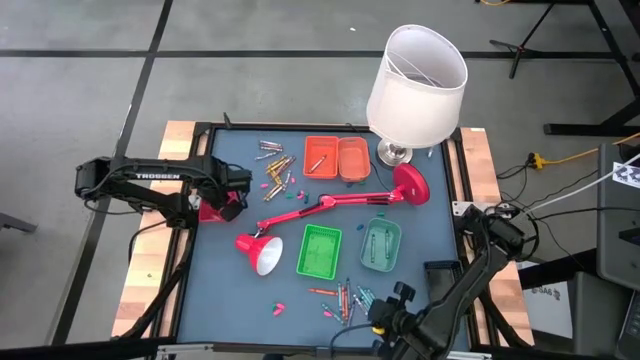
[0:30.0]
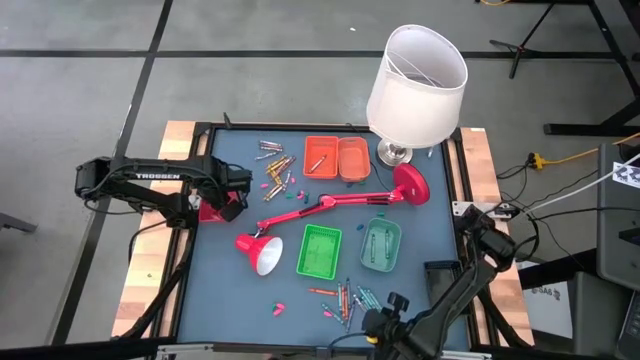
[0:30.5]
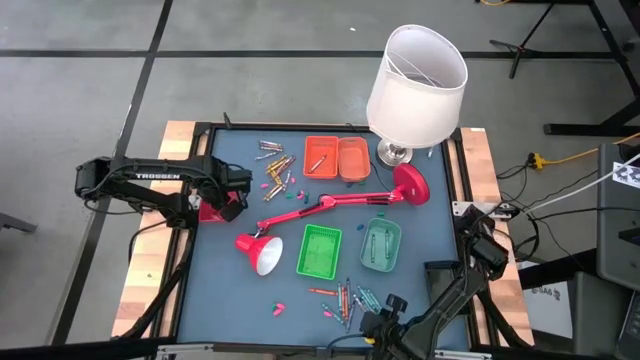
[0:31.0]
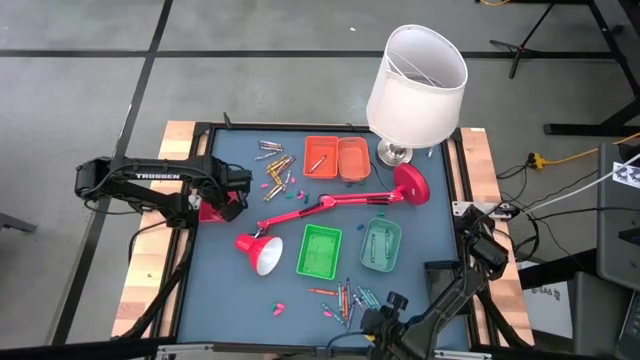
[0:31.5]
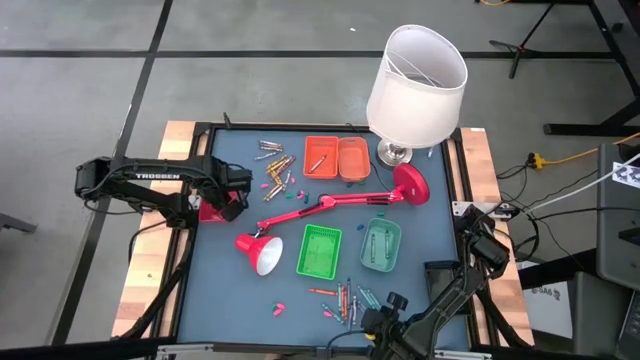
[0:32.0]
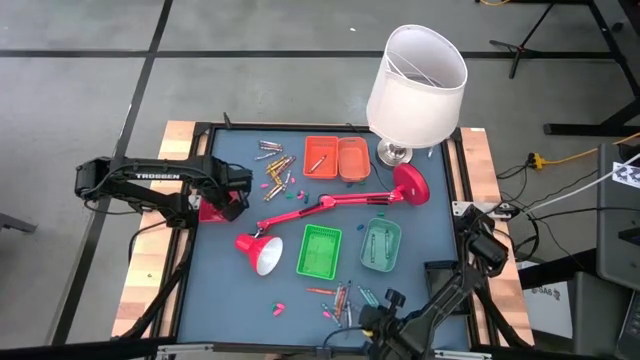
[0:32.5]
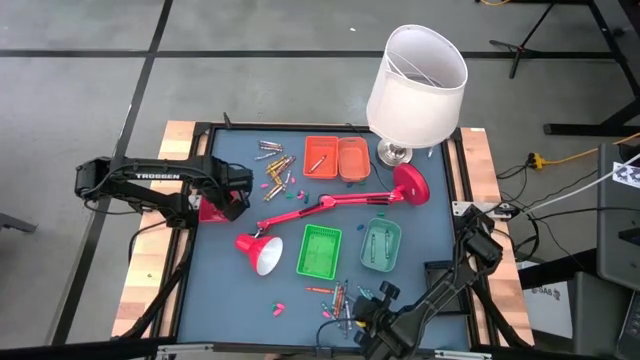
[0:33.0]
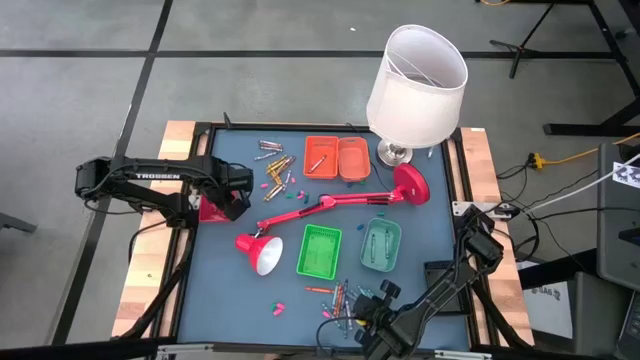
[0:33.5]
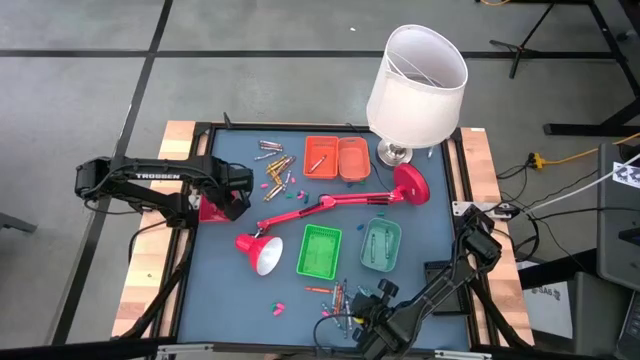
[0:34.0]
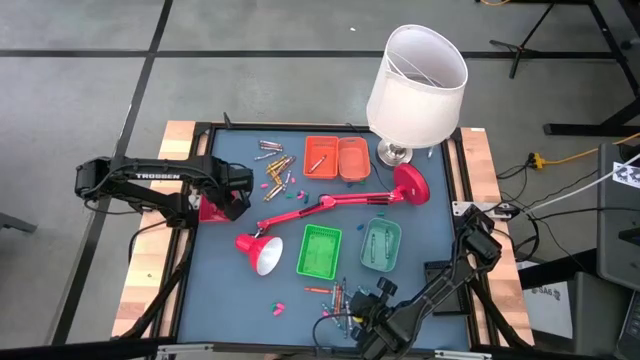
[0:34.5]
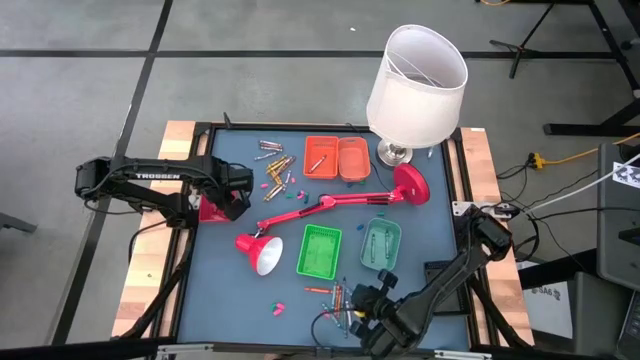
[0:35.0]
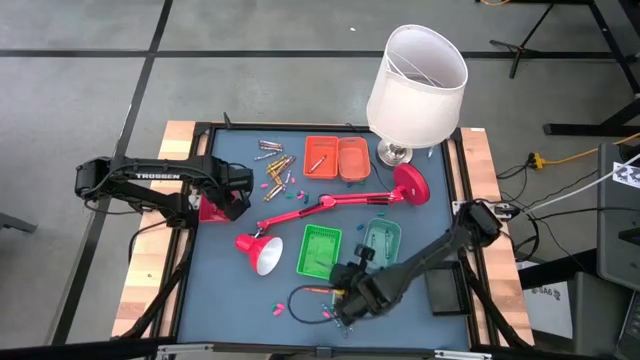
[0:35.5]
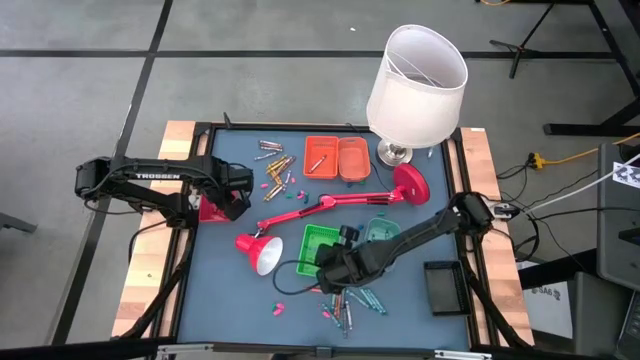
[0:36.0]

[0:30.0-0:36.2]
Task: Sort crayons
Put the violet crayon into the green bin

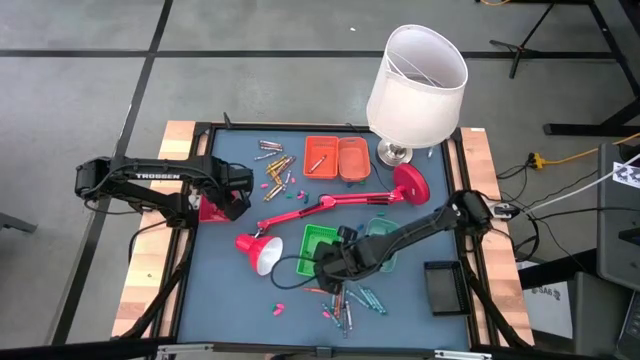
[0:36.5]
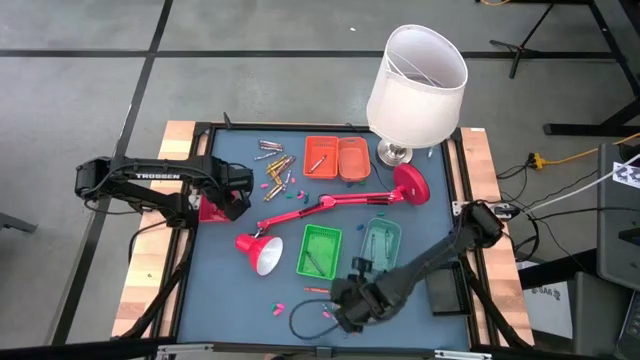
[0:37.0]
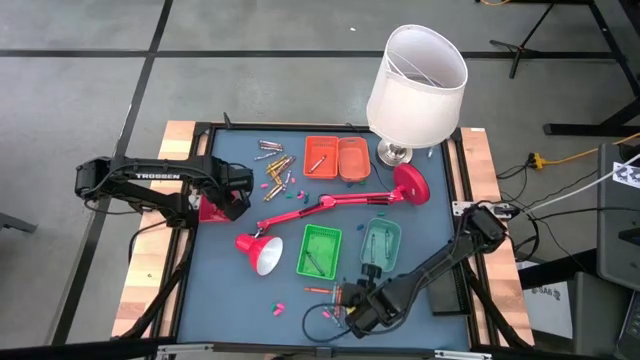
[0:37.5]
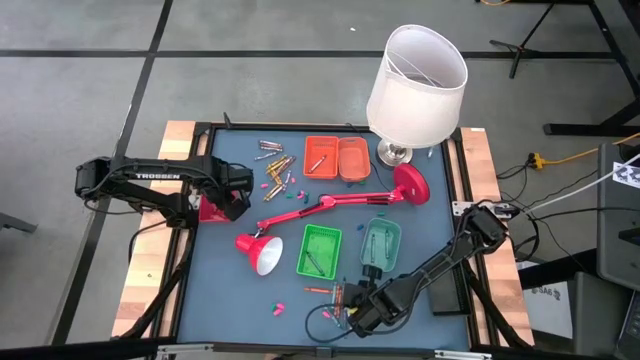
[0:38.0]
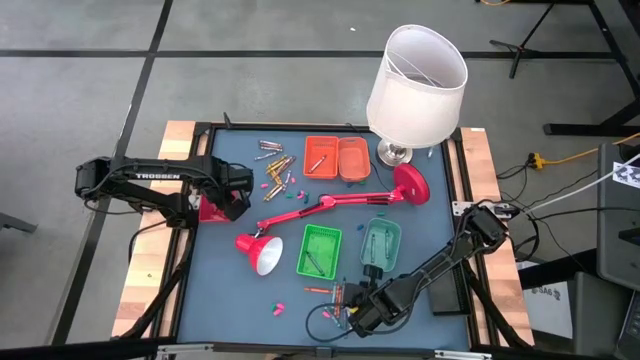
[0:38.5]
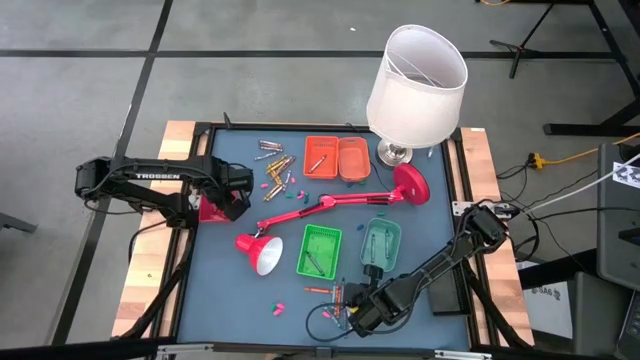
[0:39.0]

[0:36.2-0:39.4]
Put the green crayon into the light green bin

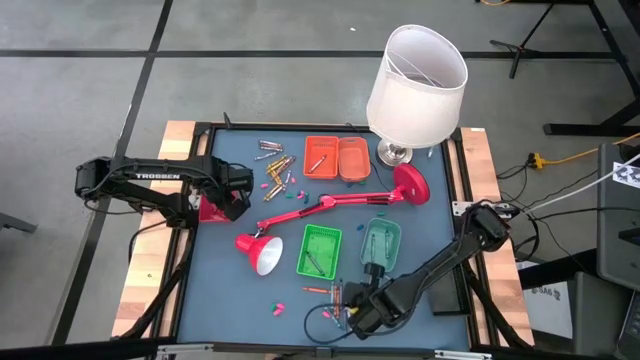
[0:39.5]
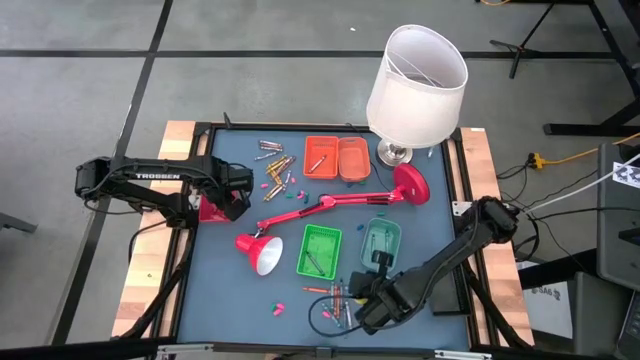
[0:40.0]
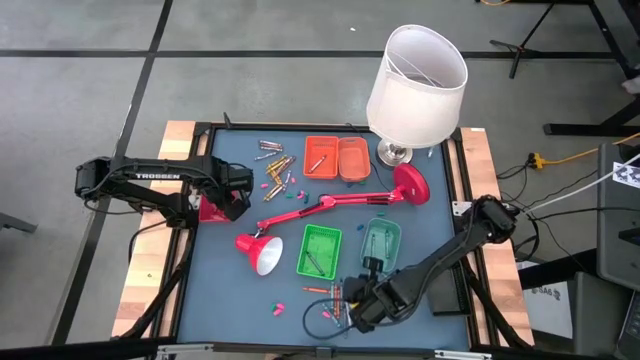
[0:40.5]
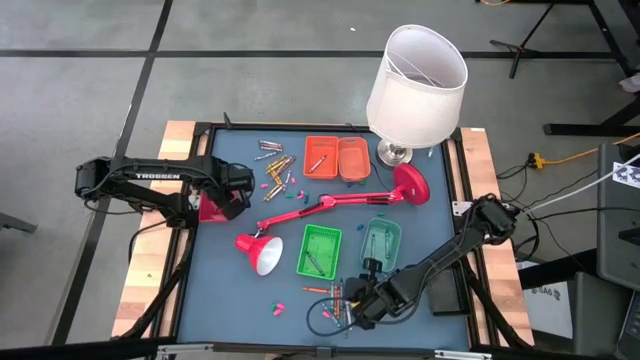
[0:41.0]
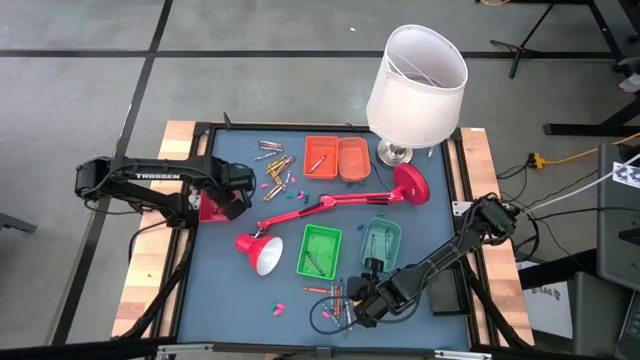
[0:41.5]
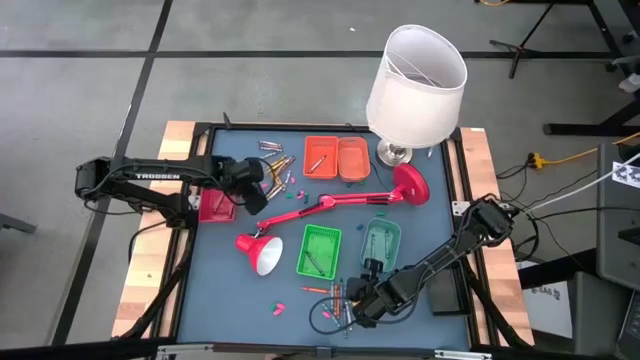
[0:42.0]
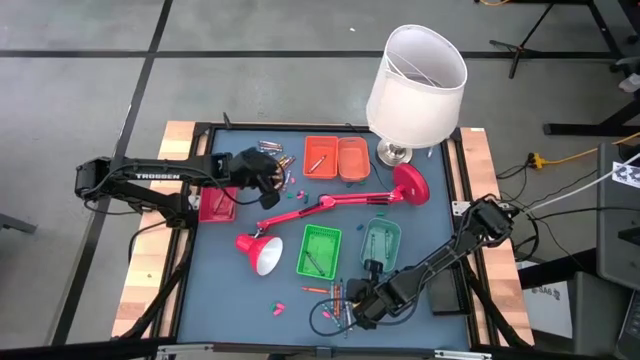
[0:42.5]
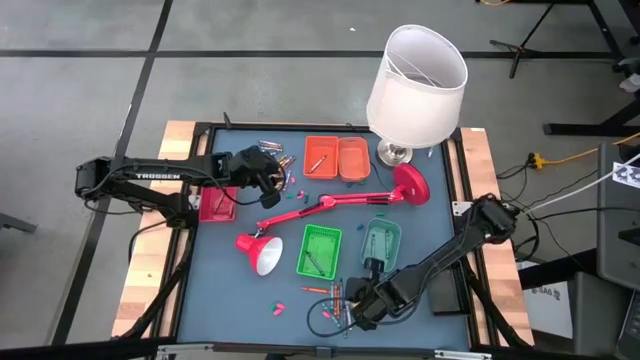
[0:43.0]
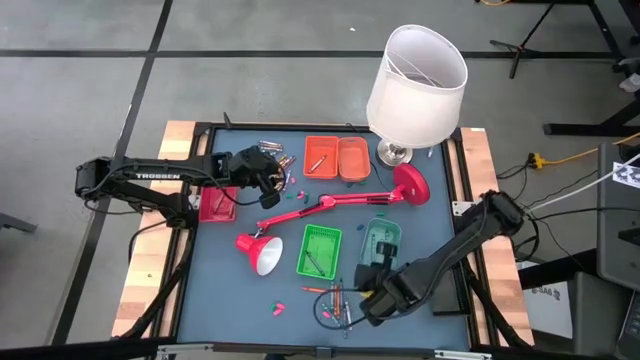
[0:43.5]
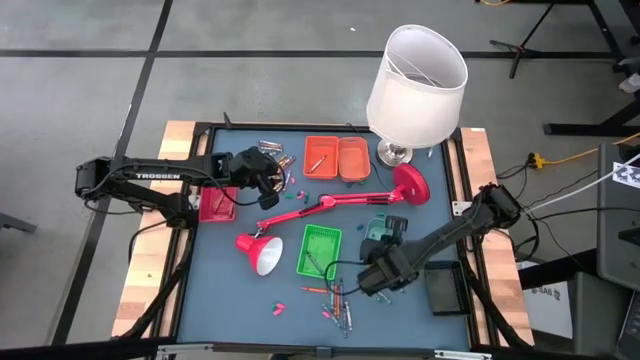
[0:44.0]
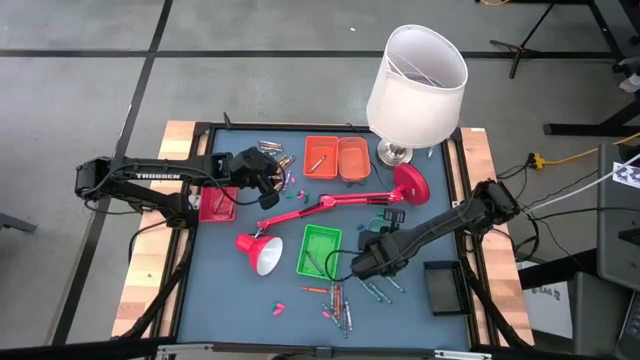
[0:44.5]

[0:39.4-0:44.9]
Put the green crayon into the light green bin

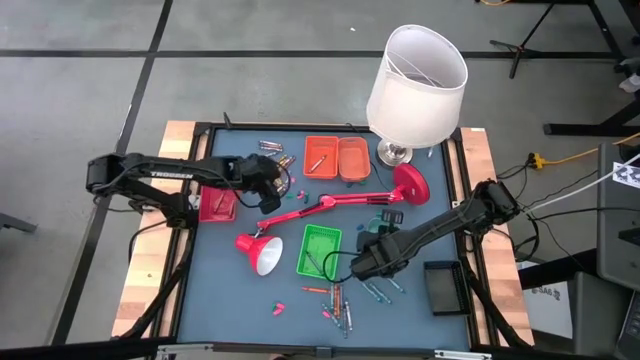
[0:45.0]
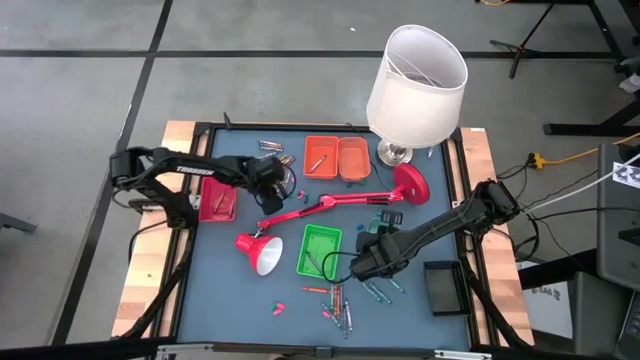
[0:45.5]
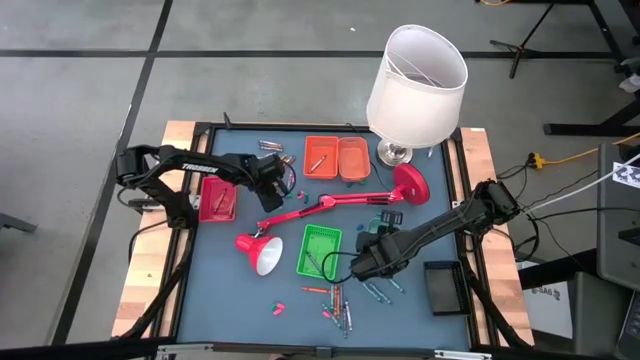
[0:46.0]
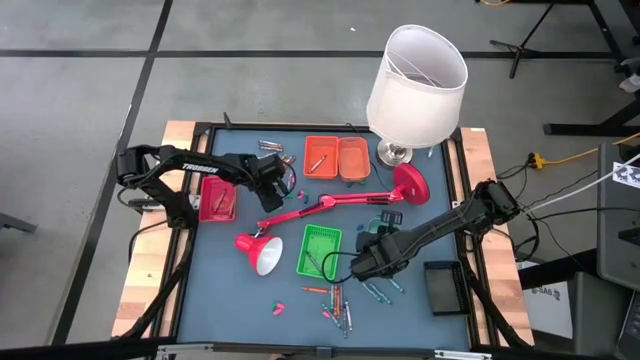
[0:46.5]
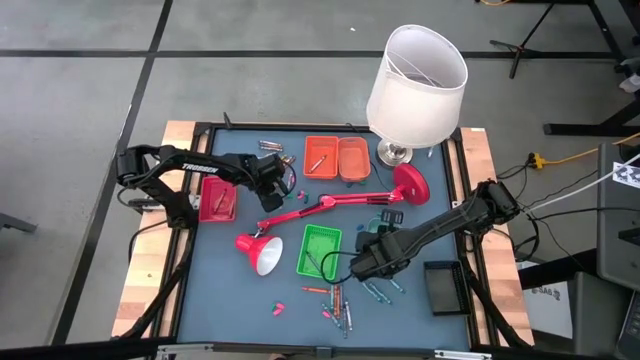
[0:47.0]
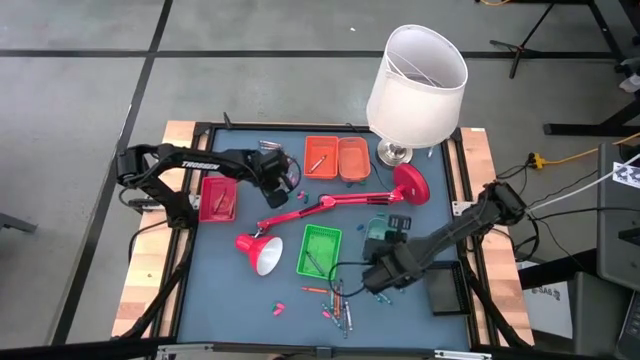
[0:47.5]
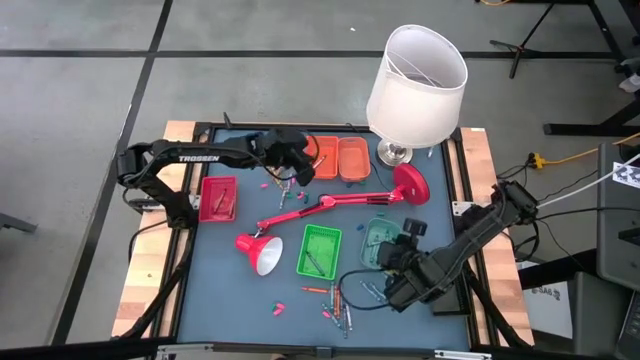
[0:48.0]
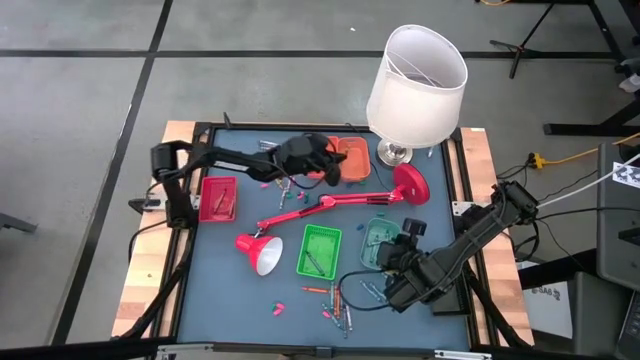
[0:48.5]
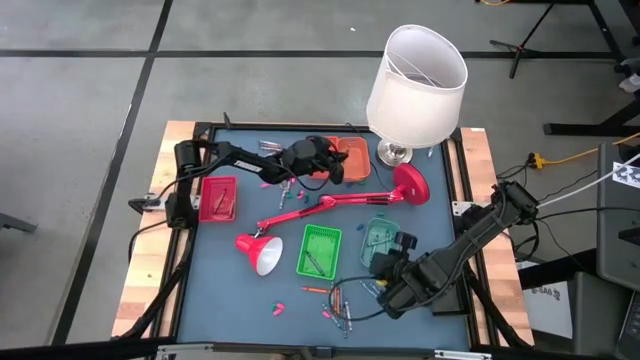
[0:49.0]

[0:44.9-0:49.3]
Put the yellow crayon into the light orange bin

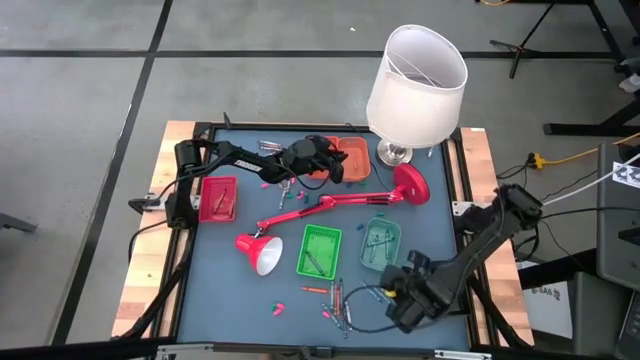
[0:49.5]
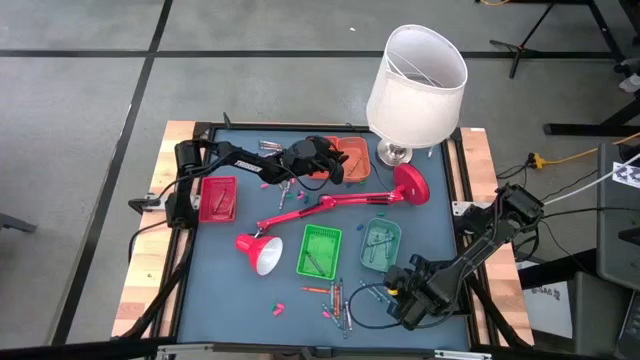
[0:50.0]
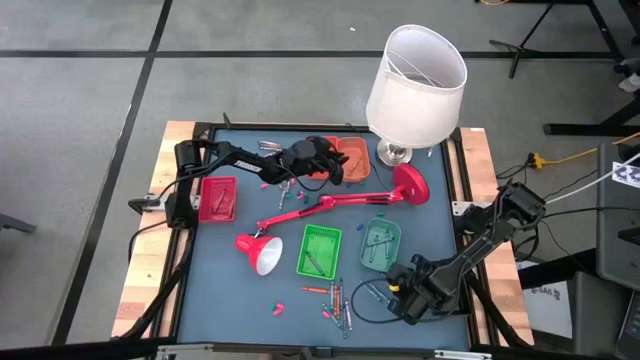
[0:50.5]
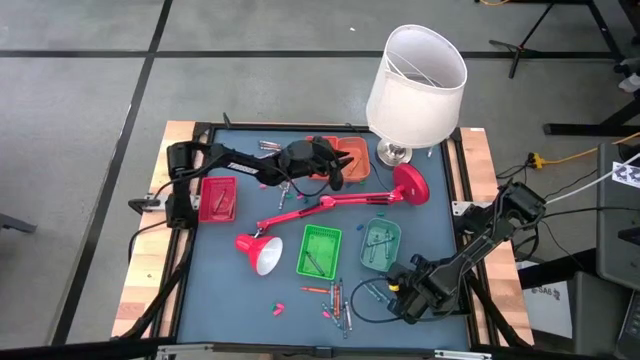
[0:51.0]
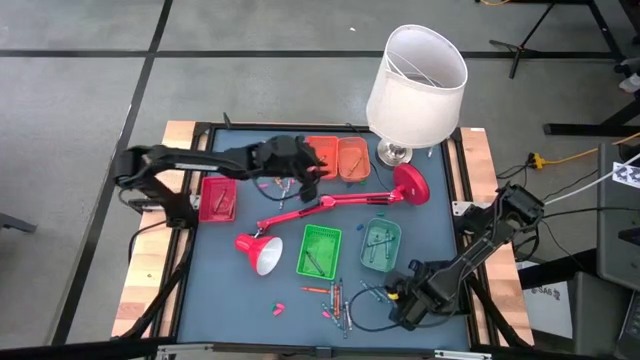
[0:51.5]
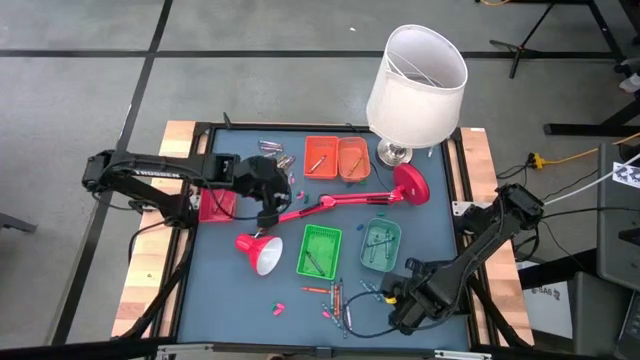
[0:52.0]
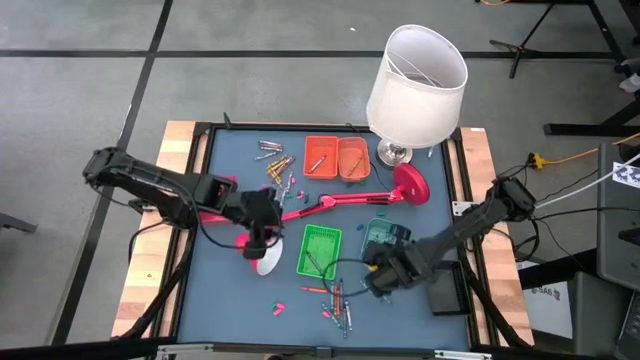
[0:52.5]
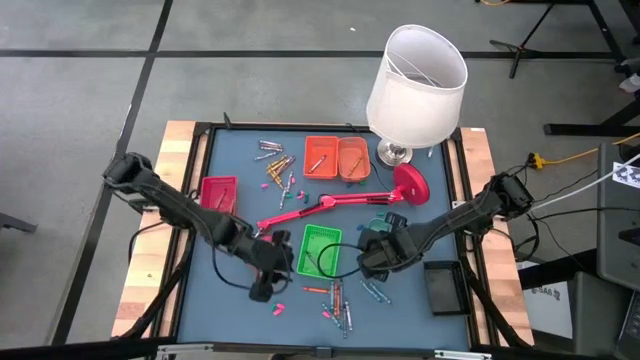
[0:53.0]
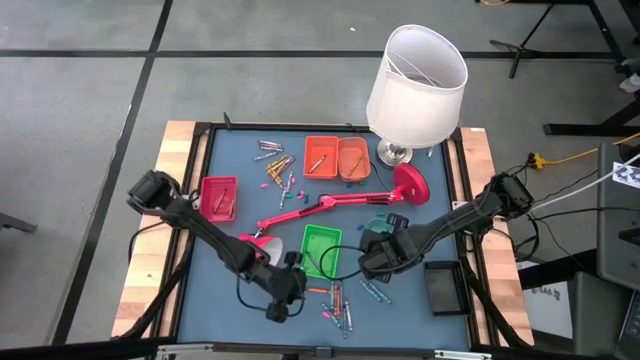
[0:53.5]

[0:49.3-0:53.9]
Put the green crayon into the light green bin
